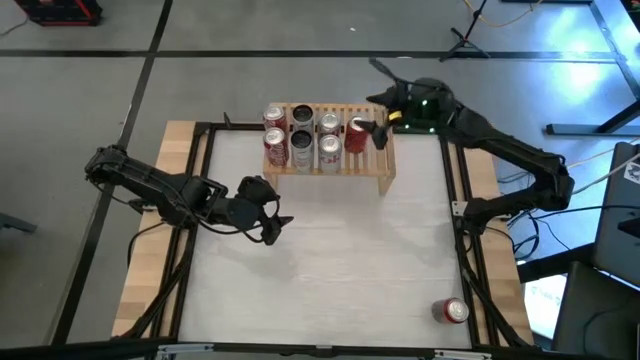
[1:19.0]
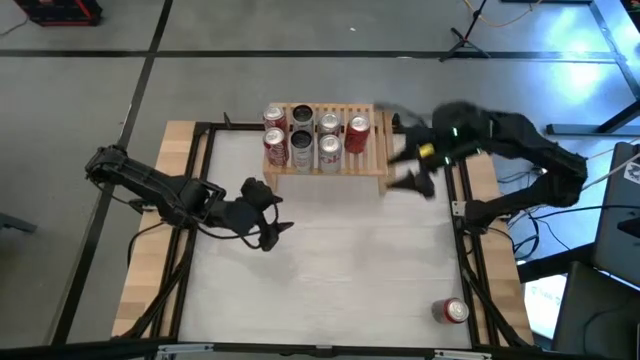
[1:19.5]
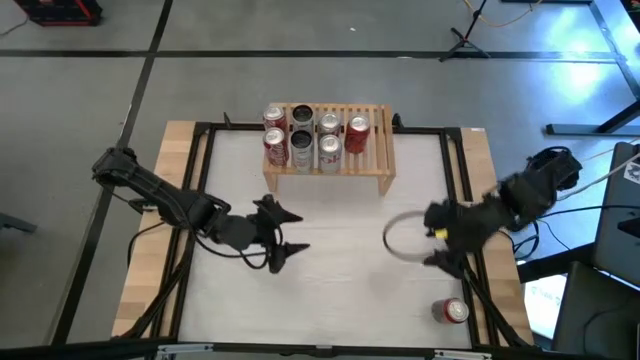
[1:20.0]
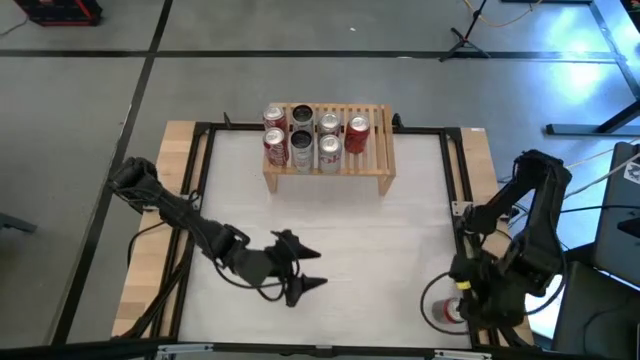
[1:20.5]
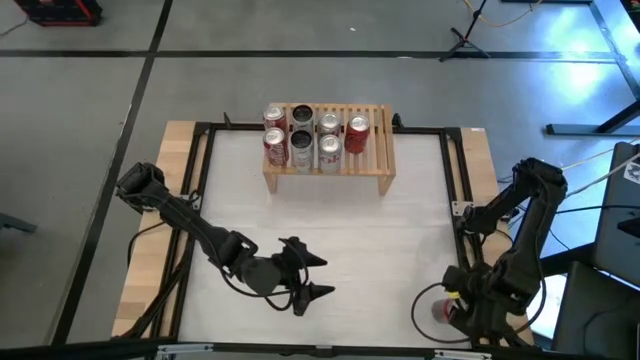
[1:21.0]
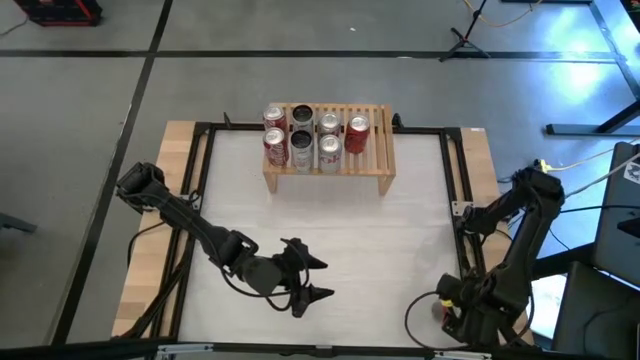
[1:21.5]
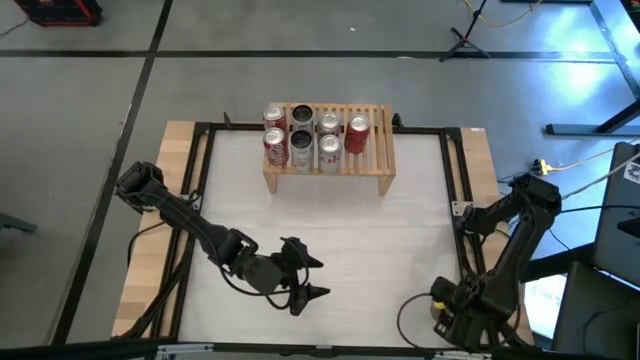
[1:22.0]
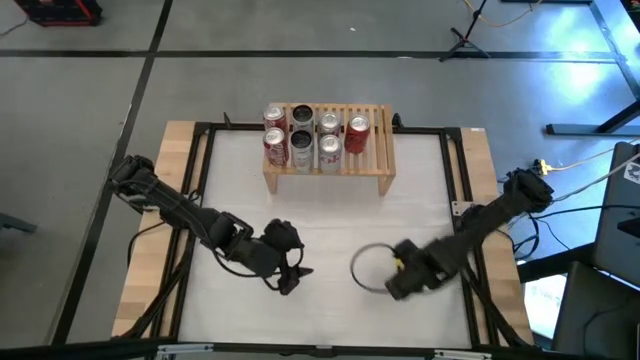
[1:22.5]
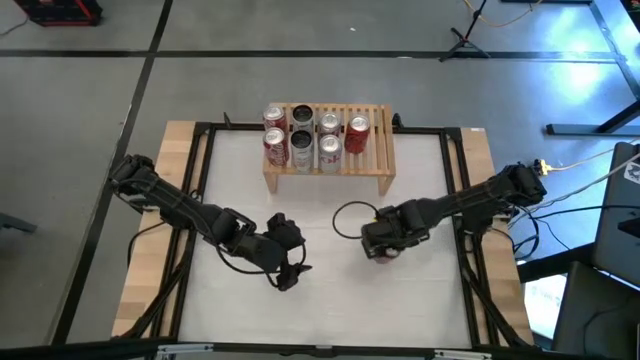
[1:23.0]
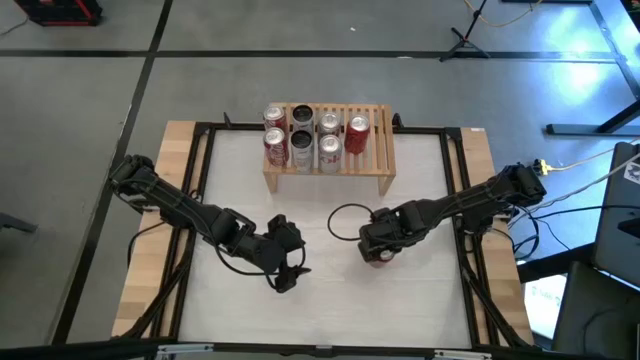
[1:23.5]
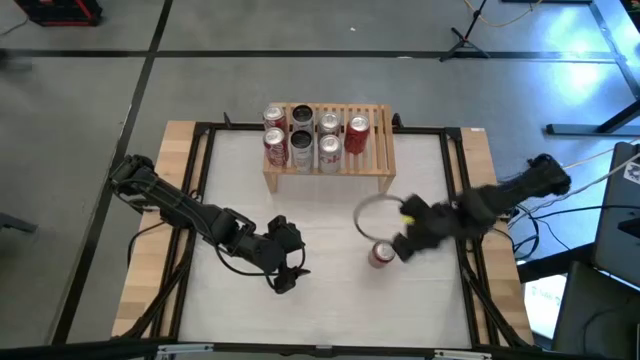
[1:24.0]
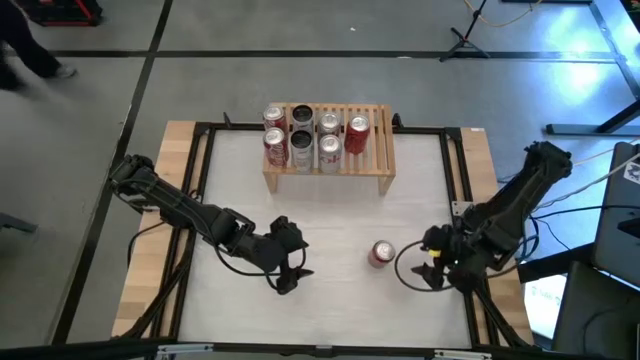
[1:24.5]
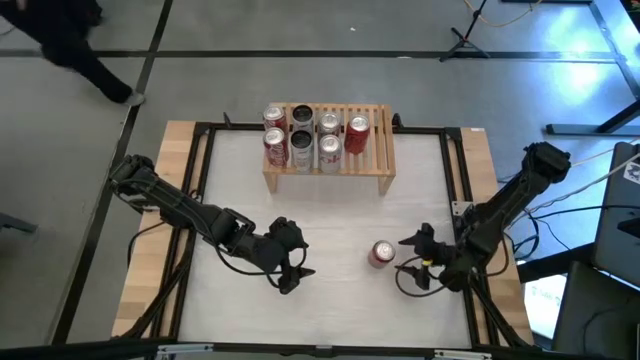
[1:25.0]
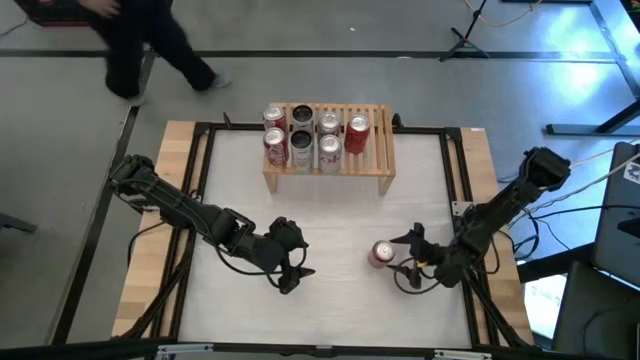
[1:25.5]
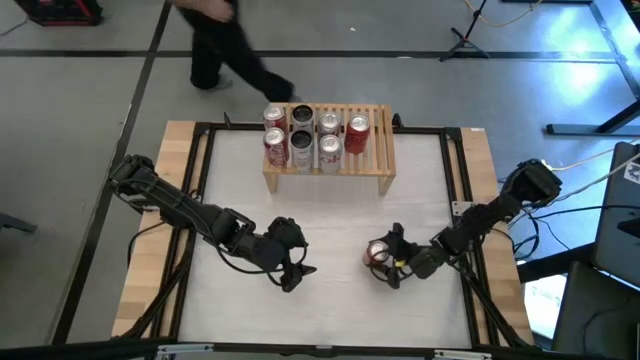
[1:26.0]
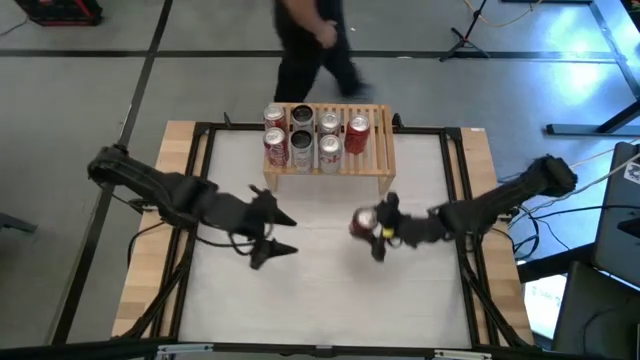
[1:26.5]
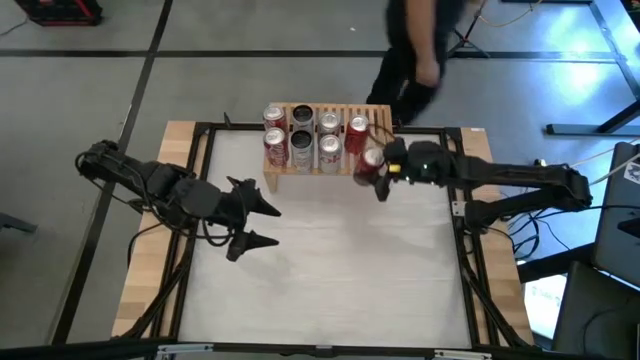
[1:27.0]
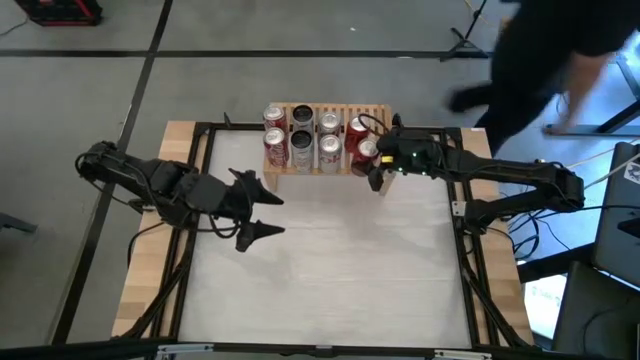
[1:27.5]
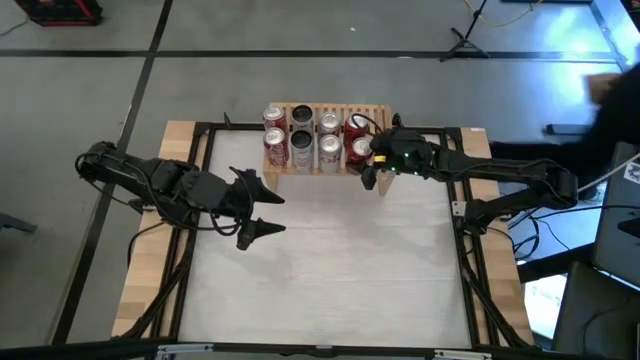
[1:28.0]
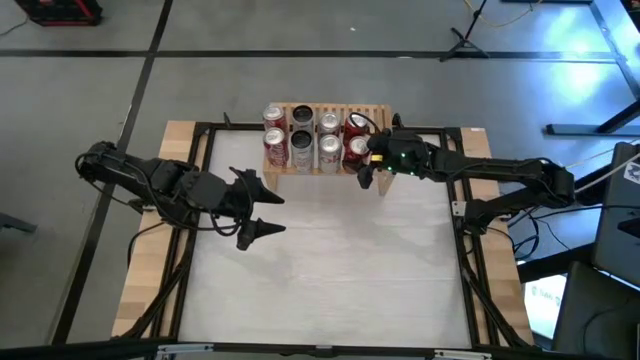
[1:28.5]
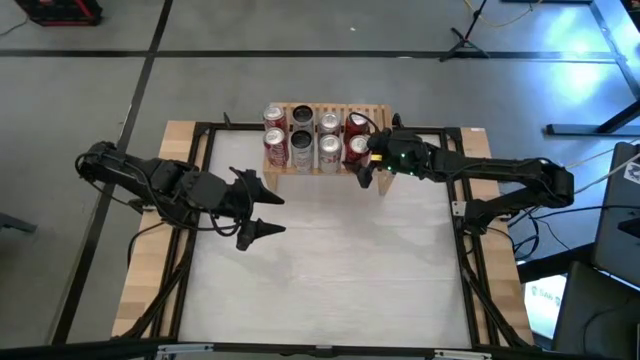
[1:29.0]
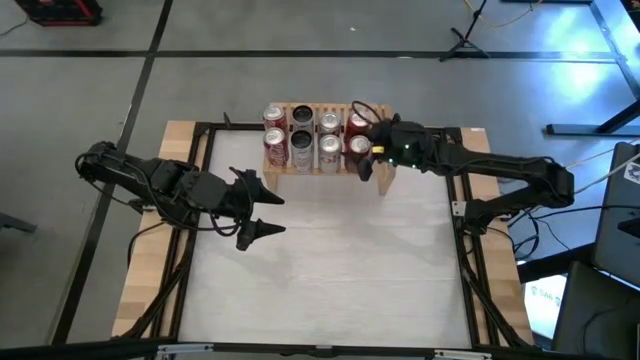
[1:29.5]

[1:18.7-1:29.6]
Task: Place canned beverage on shelf
Put the dark red soda can on the shelf aligned with the dark red soda can

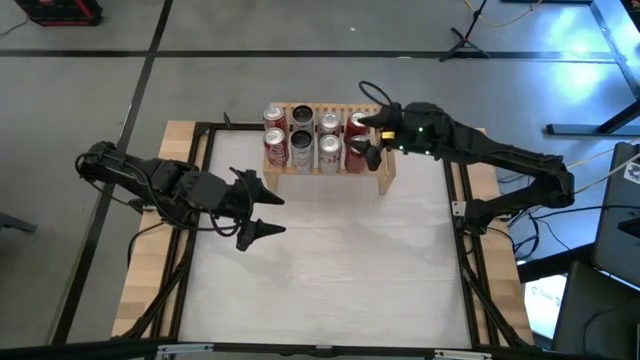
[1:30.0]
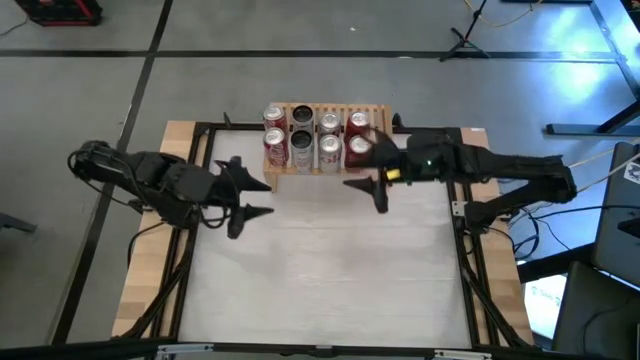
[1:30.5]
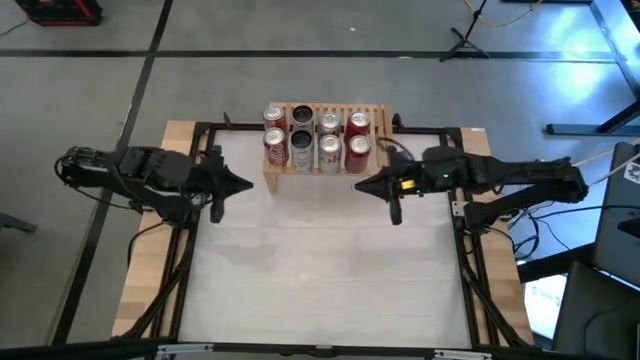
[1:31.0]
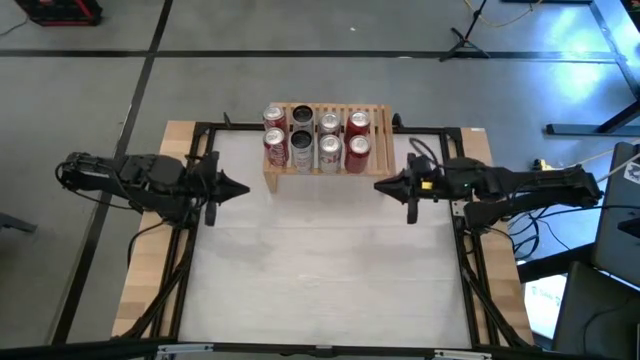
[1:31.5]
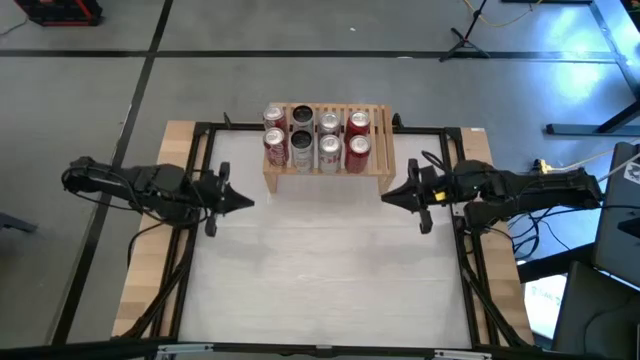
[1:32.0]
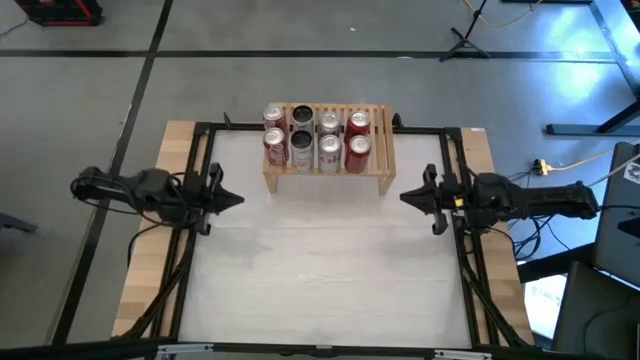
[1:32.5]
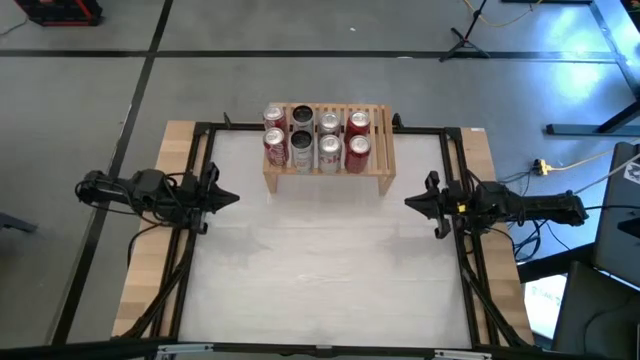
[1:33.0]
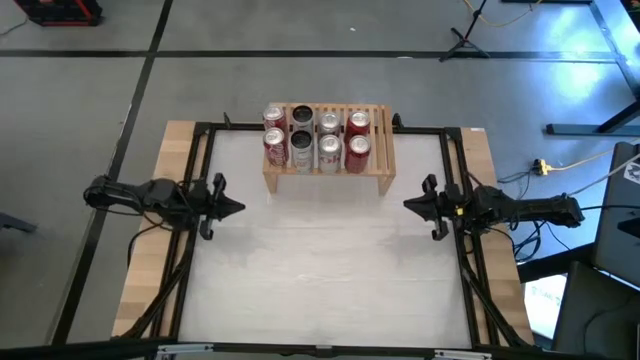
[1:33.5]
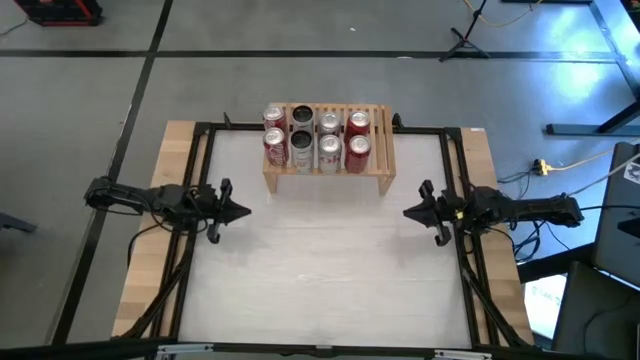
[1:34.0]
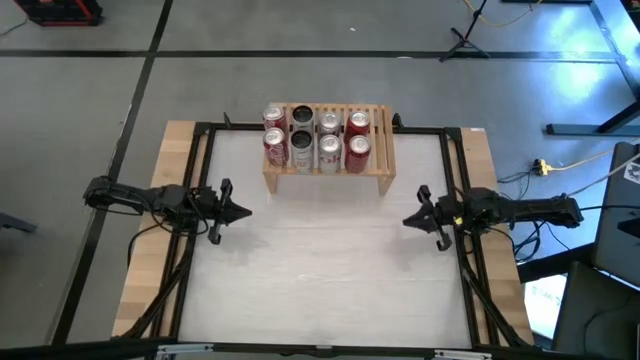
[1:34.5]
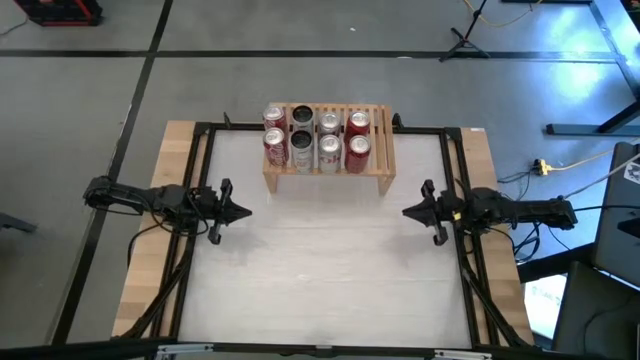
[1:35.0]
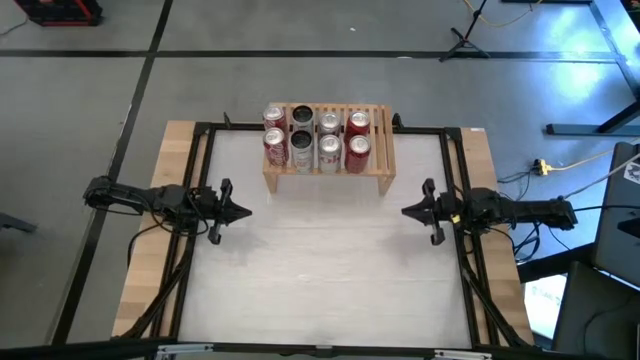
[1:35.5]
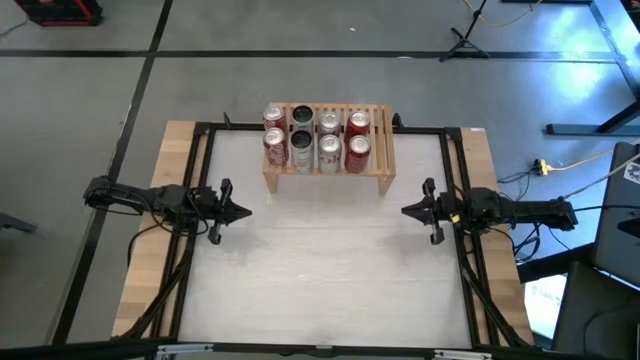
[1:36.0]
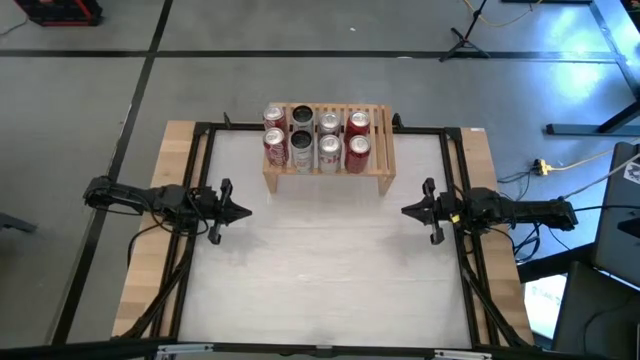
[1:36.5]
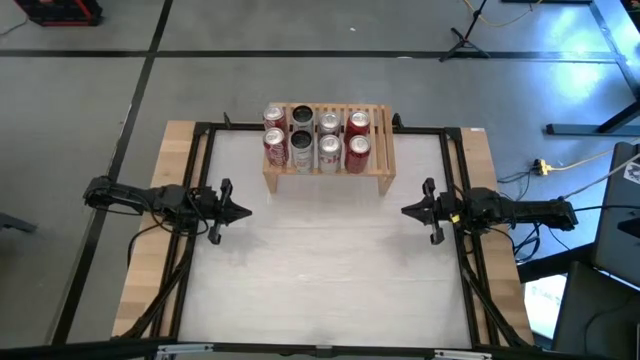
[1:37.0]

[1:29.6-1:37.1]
Return to Home Position

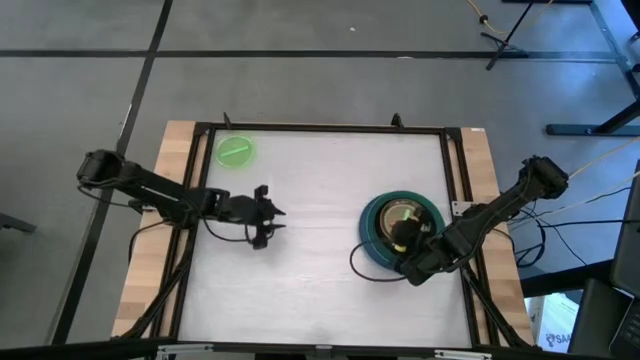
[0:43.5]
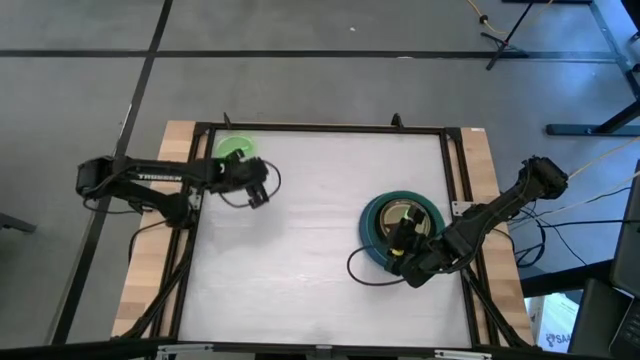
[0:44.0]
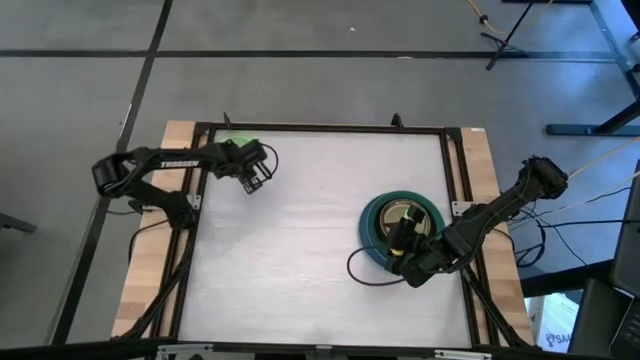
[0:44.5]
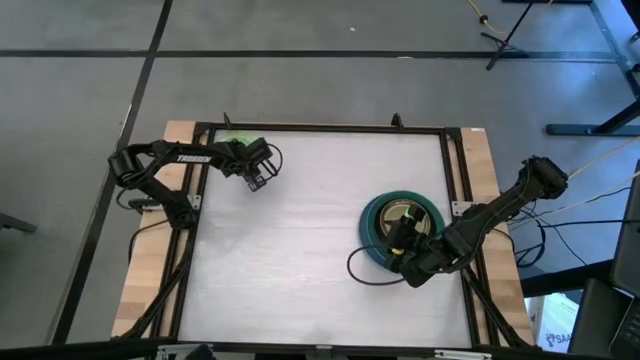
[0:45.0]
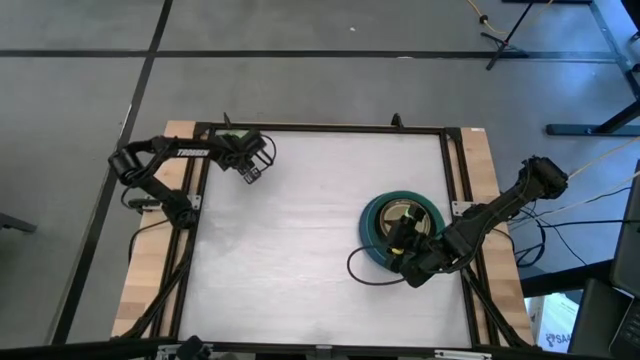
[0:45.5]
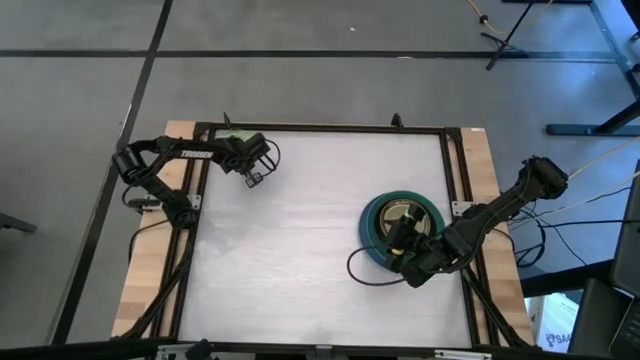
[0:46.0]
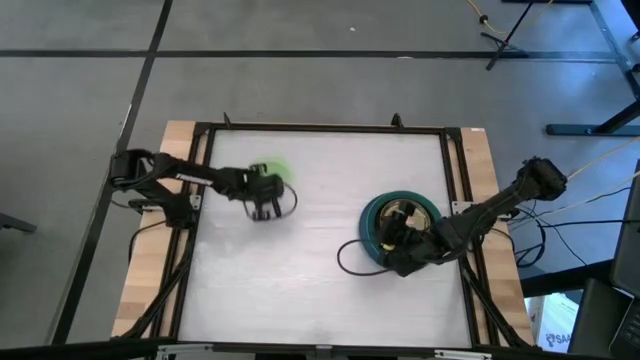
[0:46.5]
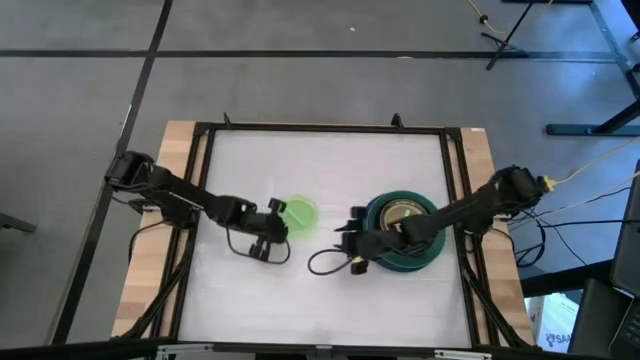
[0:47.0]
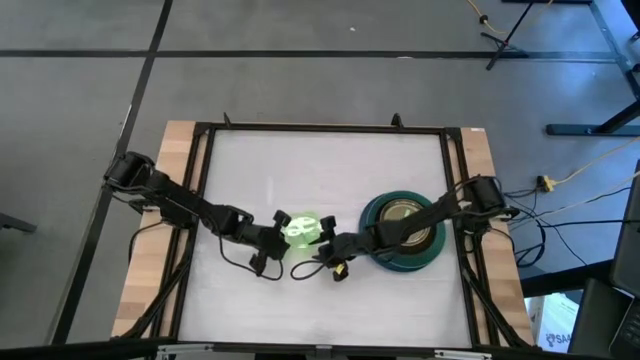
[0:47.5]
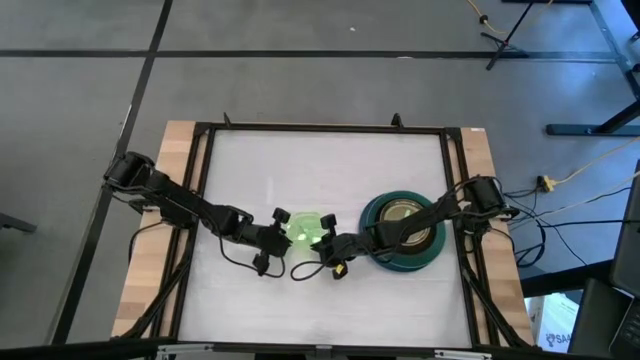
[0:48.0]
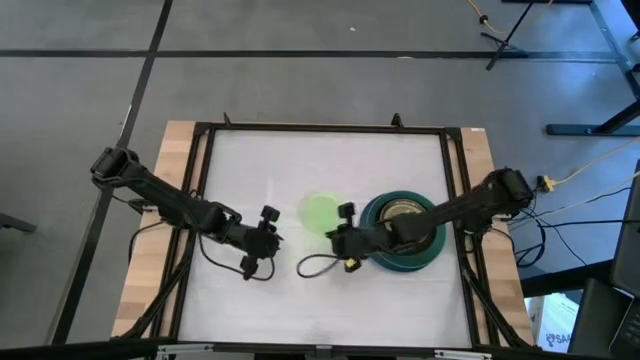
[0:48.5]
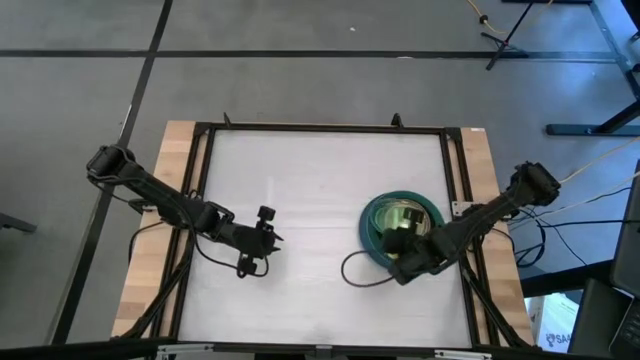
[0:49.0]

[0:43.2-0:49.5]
Task: Stack plastic plates
Stack the transparent green plate into the transparent green plate
